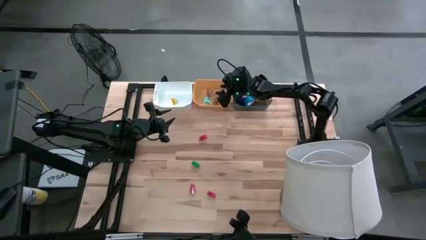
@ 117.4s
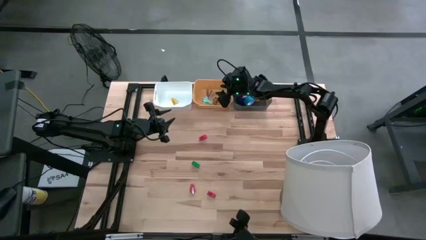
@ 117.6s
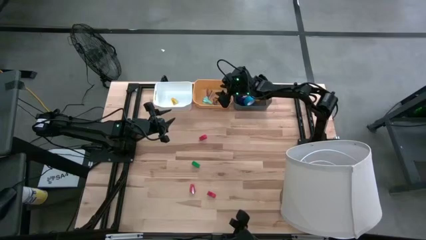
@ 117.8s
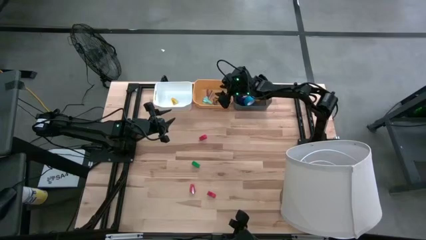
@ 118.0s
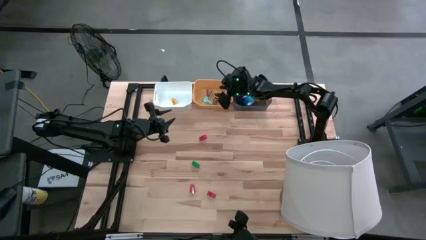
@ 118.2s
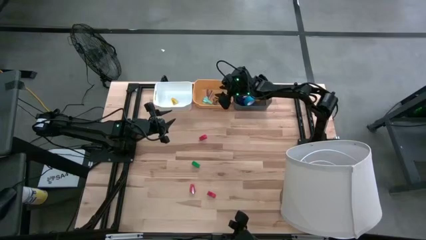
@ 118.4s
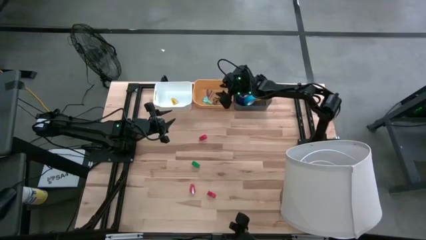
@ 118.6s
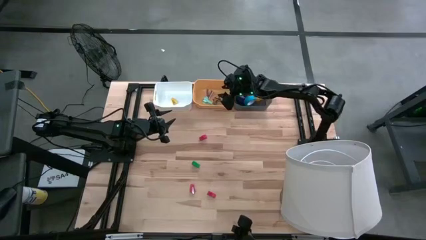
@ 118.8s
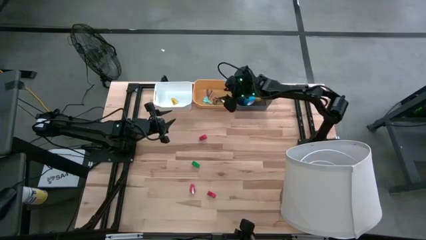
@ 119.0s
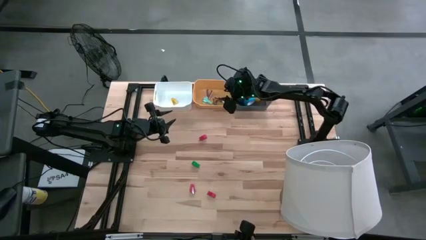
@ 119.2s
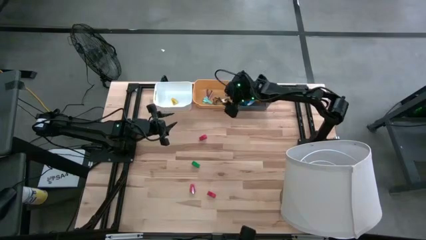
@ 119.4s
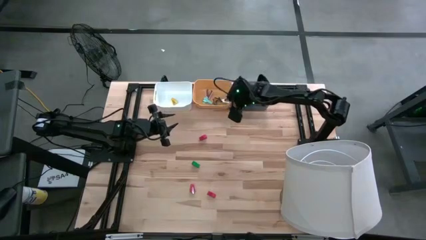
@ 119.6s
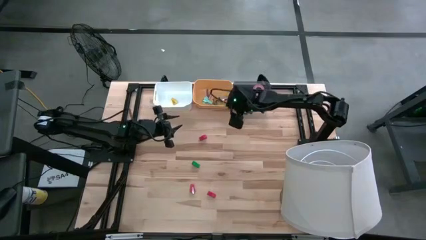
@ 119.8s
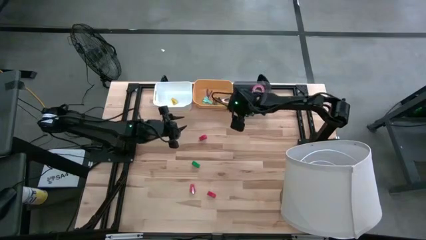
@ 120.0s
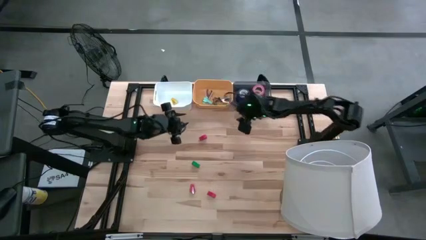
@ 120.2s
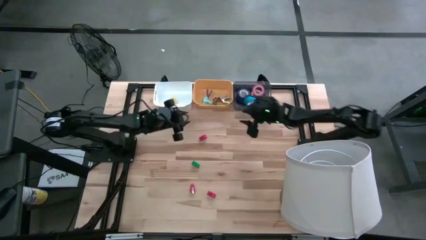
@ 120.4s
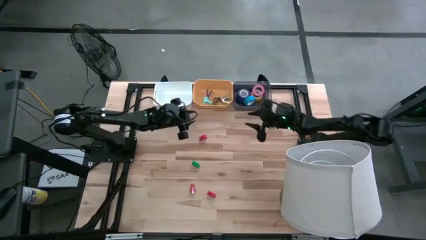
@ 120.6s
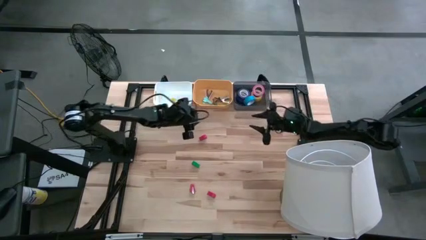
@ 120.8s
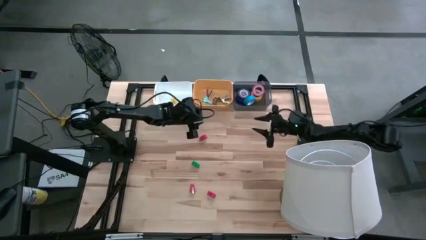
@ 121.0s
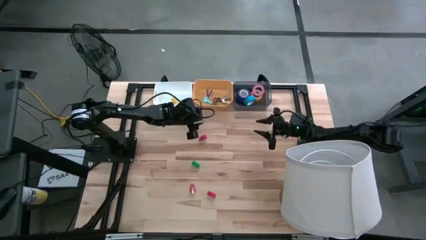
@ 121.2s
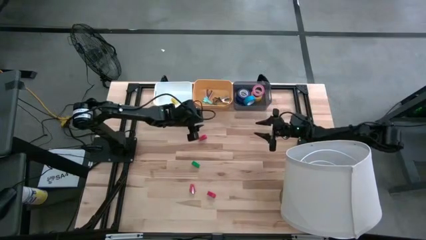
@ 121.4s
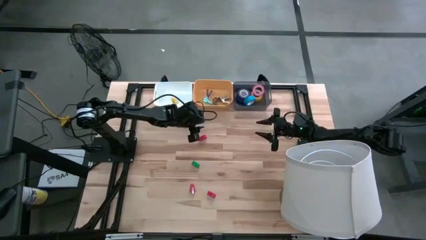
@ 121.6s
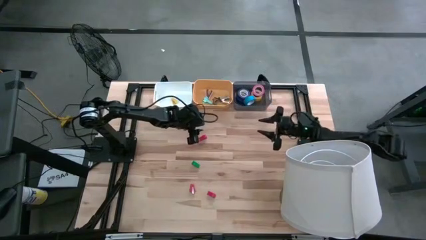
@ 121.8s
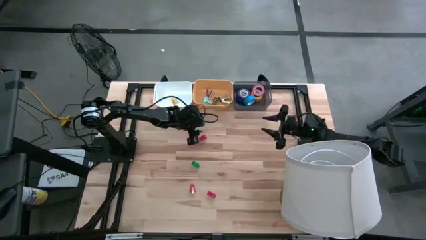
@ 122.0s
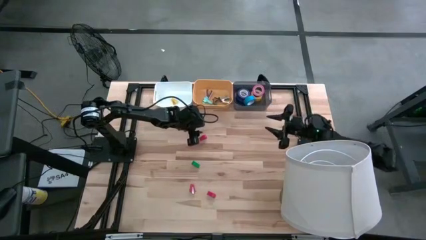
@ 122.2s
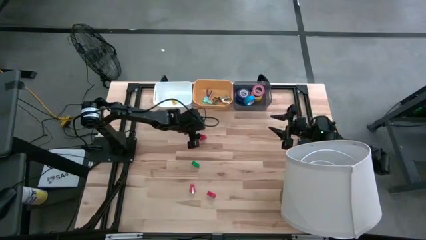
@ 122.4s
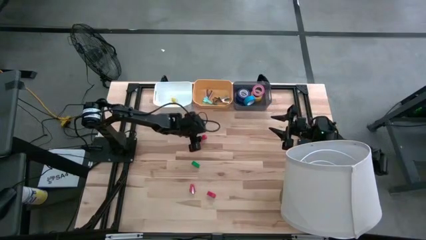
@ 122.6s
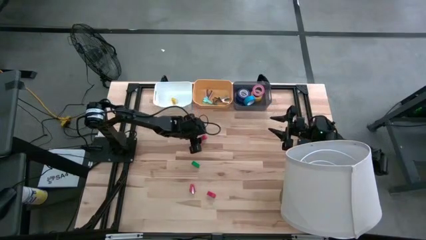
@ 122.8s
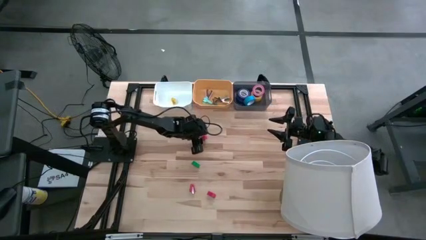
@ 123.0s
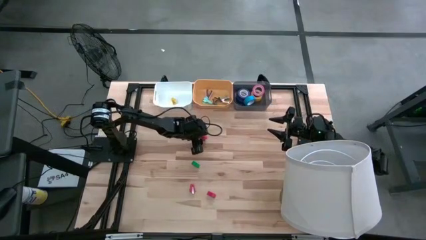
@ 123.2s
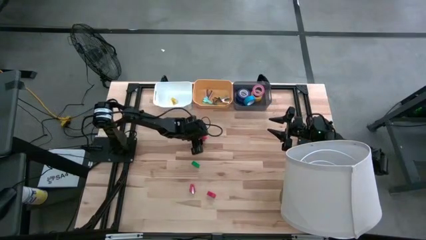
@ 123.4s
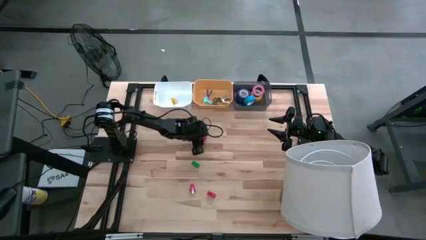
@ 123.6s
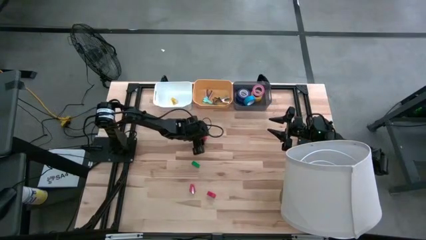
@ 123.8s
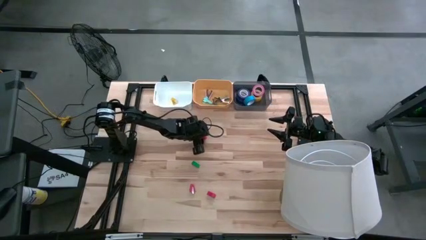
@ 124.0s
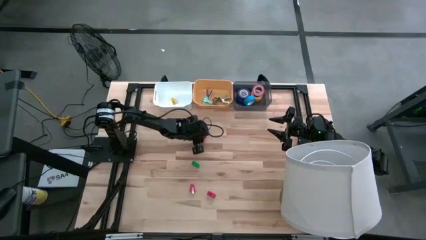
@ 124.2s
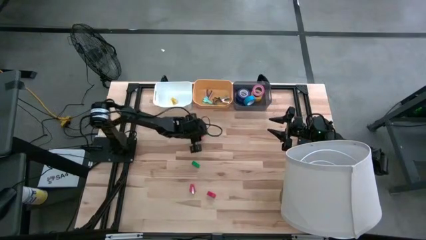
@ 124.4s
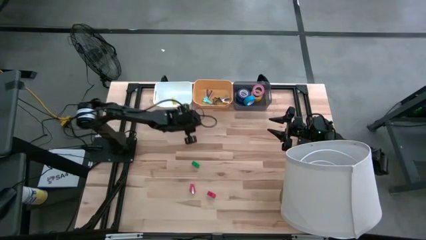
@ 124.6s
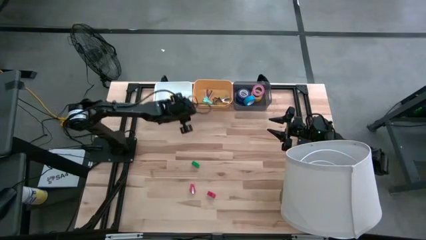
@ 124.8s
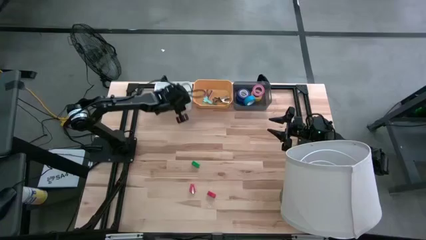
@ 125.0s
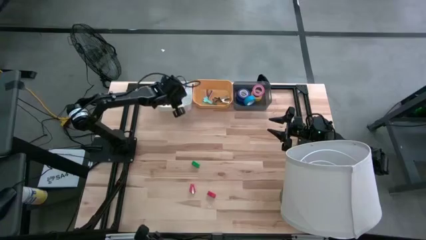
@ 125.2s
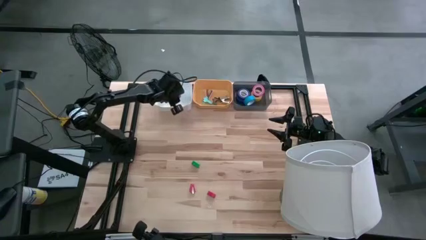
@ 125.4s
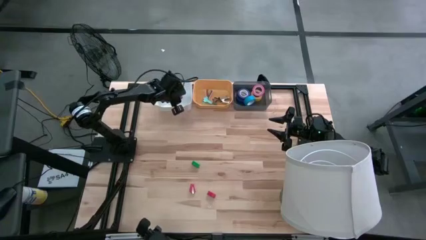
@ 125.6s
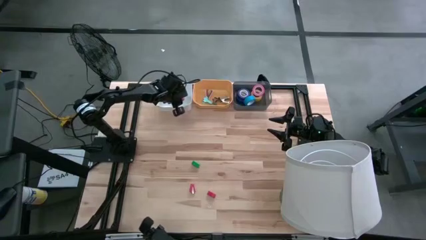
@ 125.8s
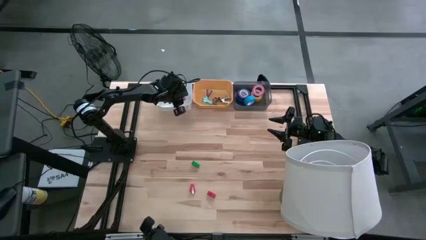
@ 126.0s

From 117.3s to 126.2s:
Task: Pick and place Stapler, Stapler remover, tape
Put the top red stapler into the white bin

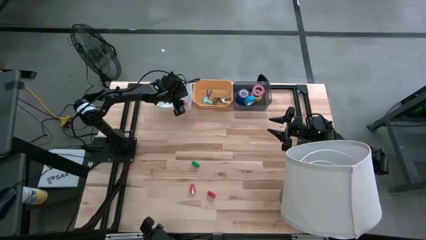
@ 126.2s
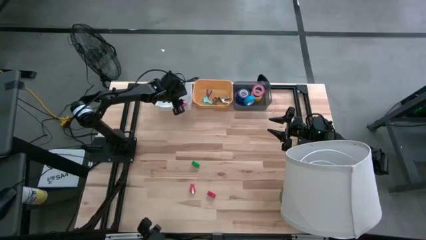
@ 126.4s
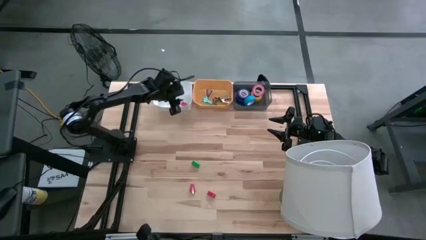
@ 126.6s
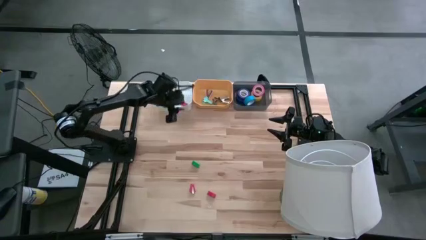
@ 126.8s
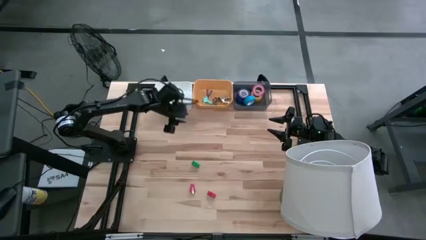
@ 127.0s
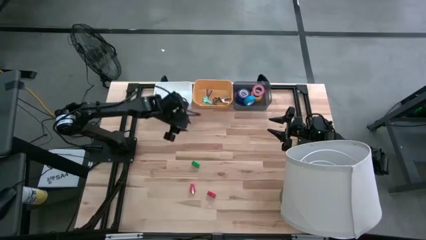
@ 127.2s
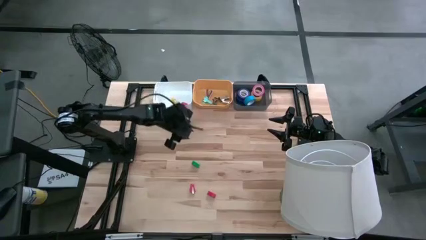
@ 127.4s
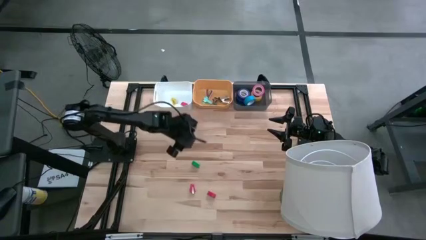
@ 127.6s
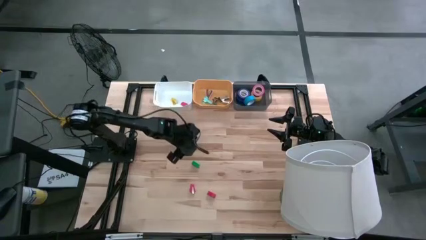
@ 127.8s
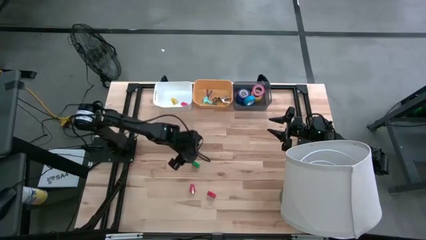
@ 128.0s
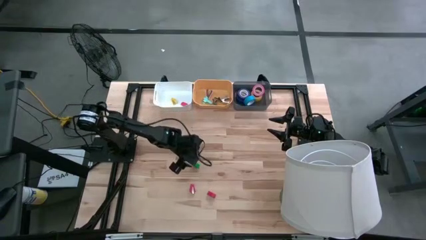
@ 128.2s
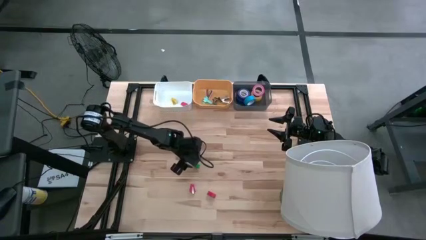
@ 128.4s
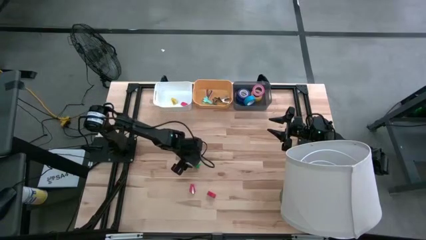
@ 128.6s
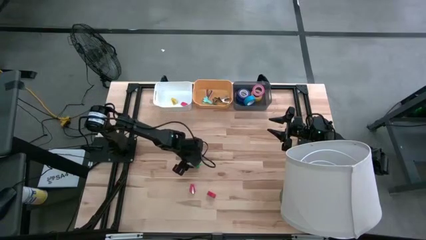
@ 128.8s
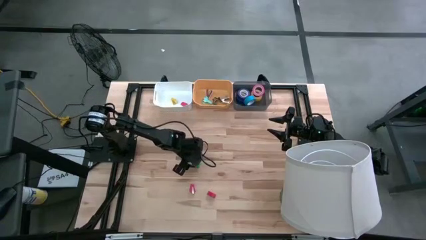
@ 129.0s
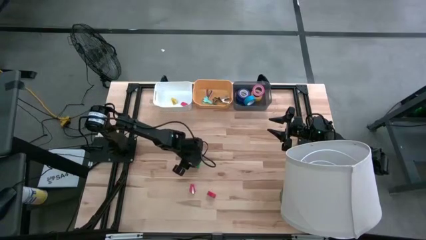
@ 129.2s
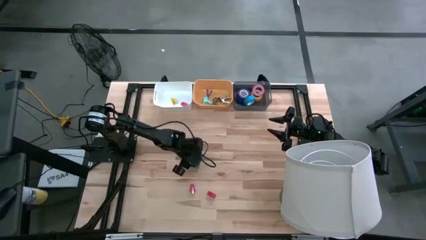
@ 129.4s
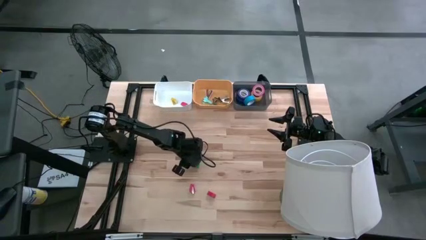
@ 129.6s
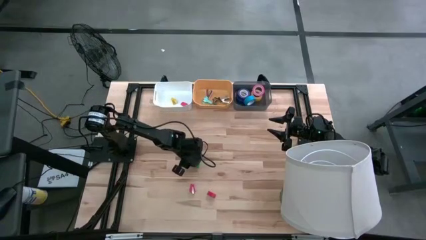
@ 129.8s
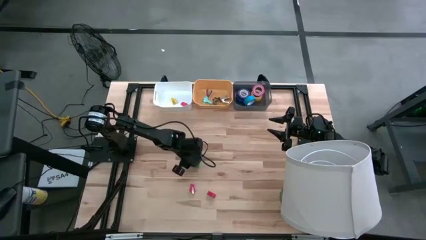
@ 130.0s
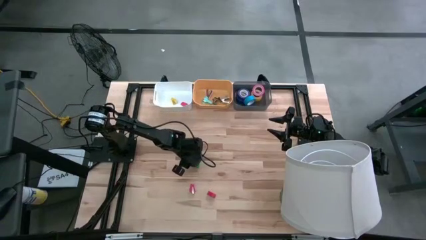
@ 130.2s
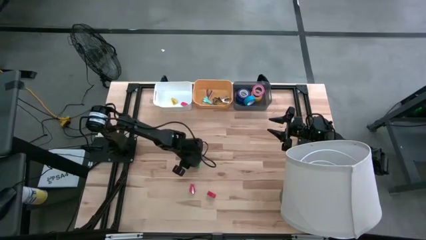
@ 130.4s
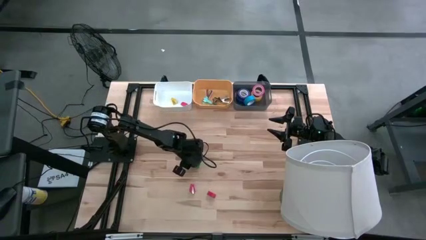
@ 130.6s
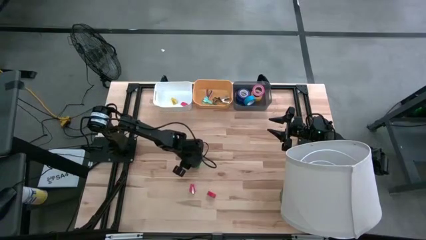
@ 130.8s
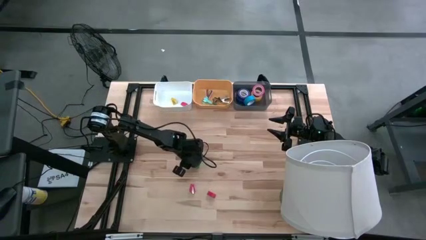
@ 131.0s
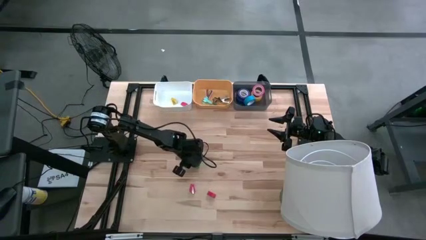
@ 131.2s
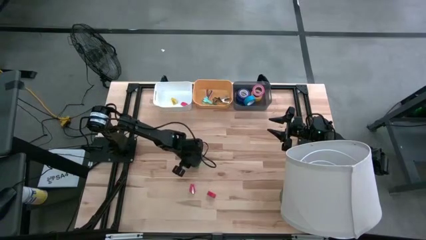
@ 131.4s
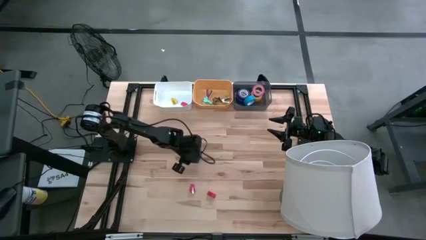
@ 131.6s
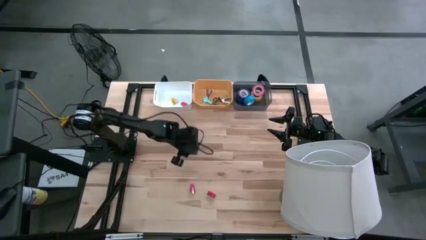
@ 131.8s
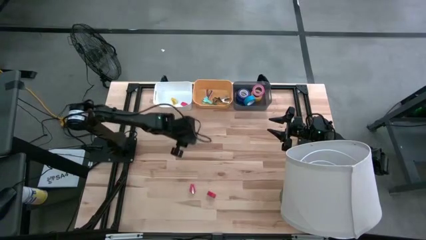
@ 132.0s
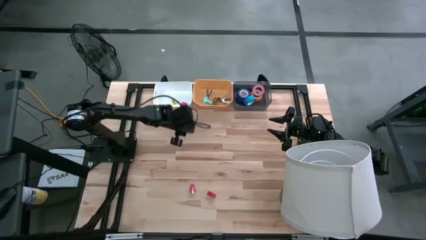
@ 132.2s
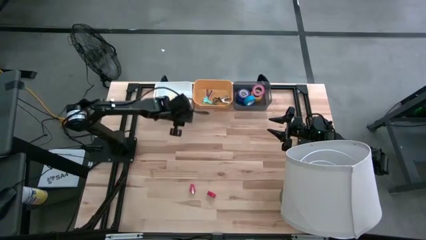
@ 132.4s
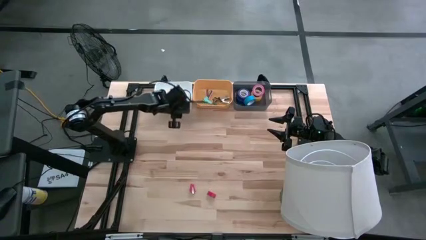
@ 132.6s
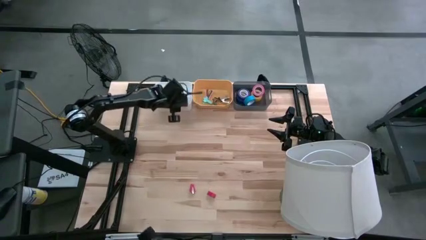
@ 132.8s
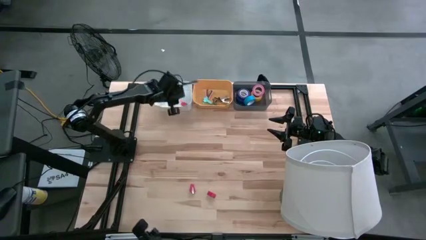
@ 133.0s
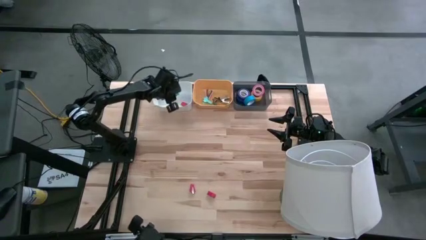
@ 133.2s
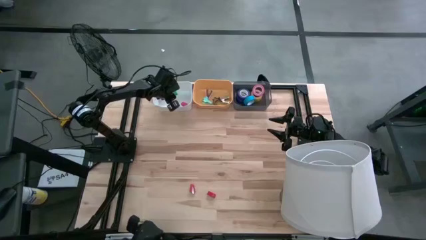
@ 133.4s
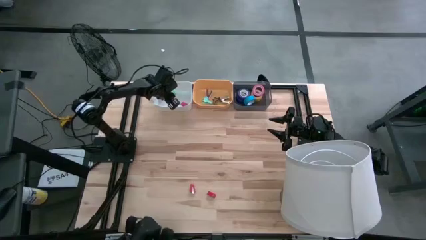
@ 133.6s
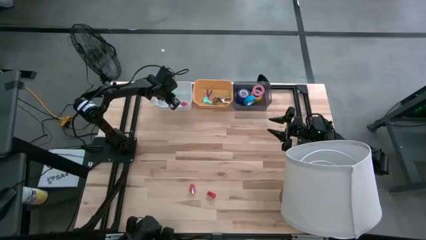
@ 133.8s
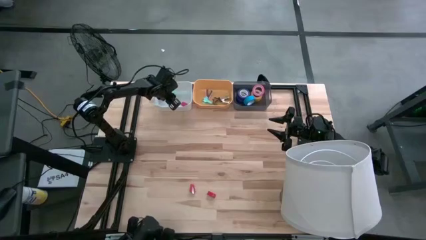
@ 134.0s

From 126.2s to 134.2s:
Put the green stapler into the white bin
